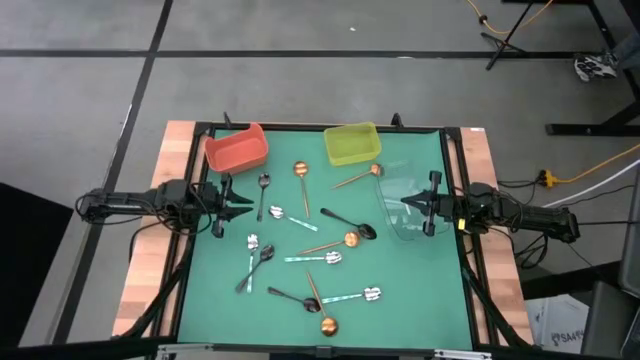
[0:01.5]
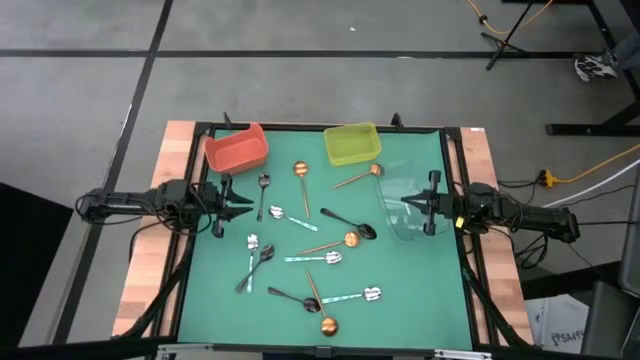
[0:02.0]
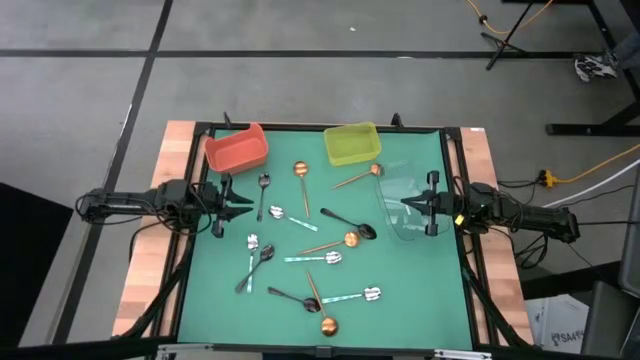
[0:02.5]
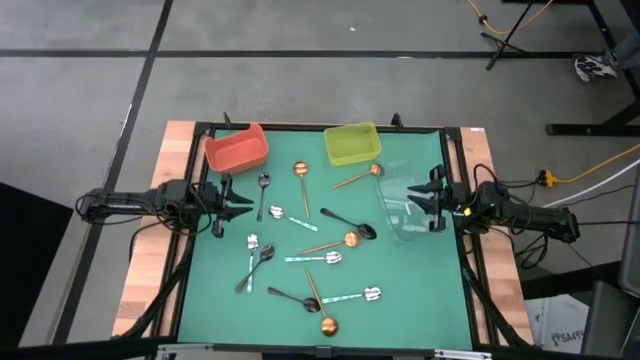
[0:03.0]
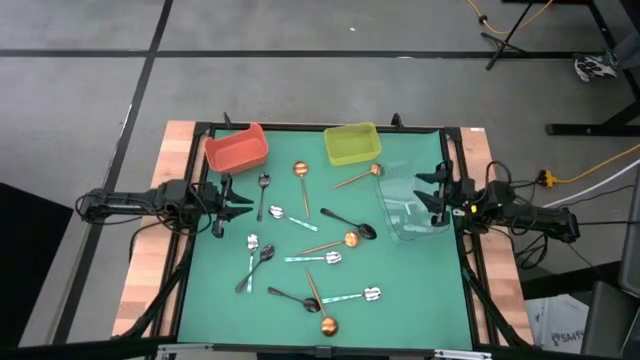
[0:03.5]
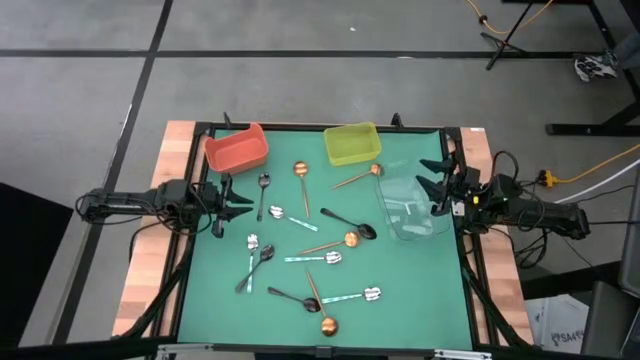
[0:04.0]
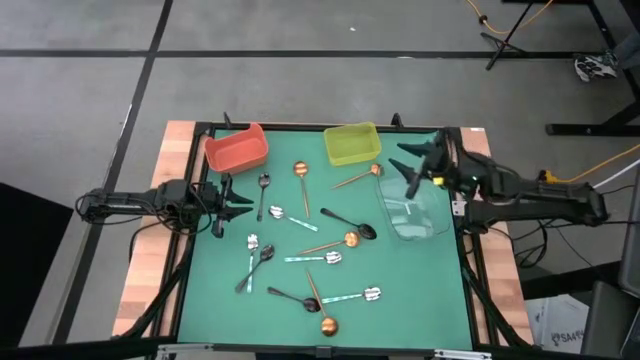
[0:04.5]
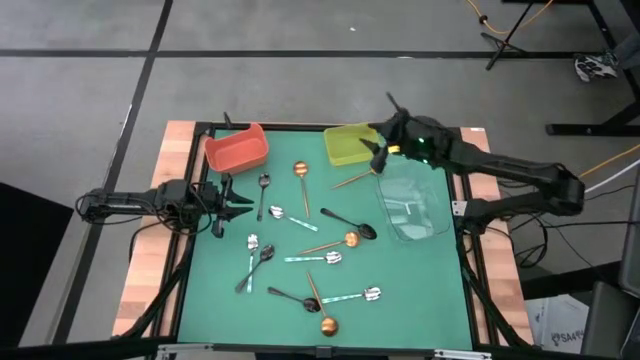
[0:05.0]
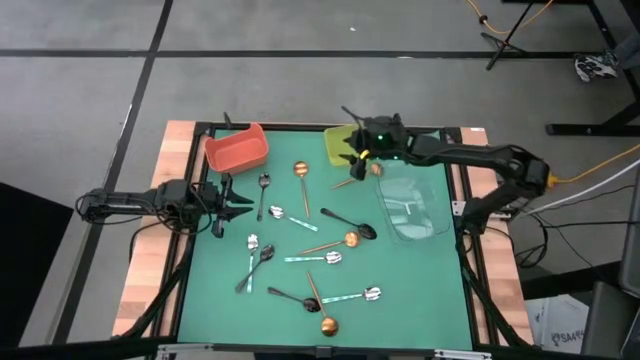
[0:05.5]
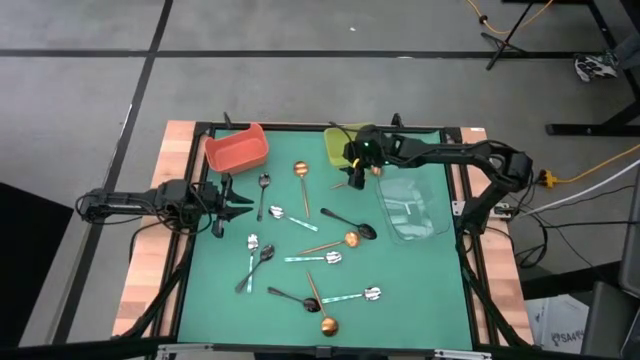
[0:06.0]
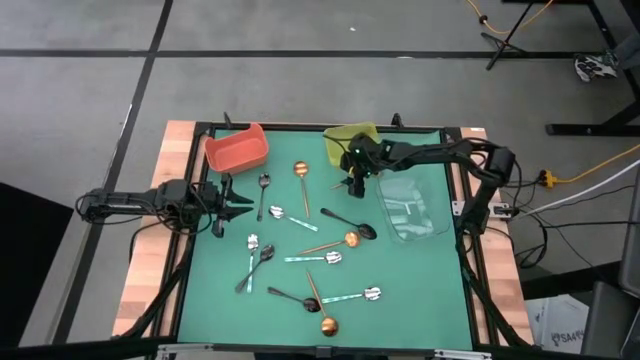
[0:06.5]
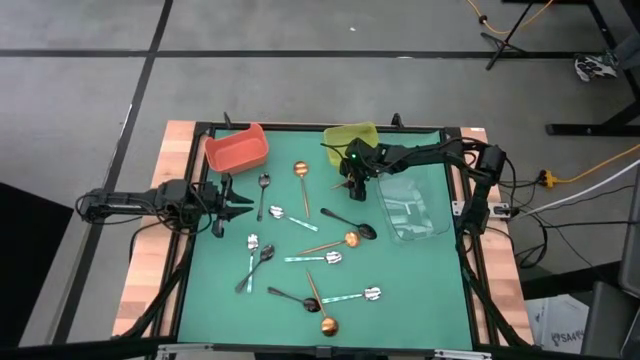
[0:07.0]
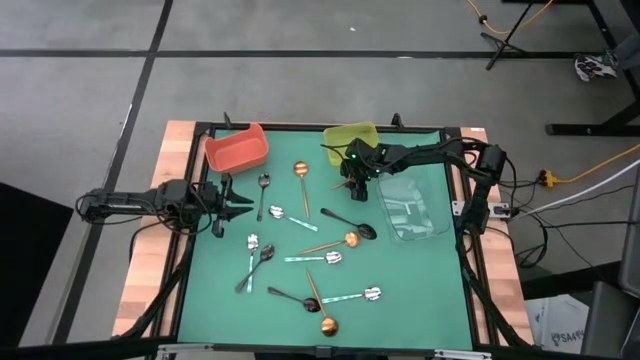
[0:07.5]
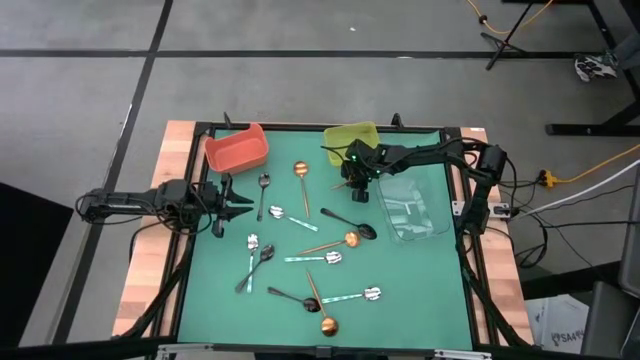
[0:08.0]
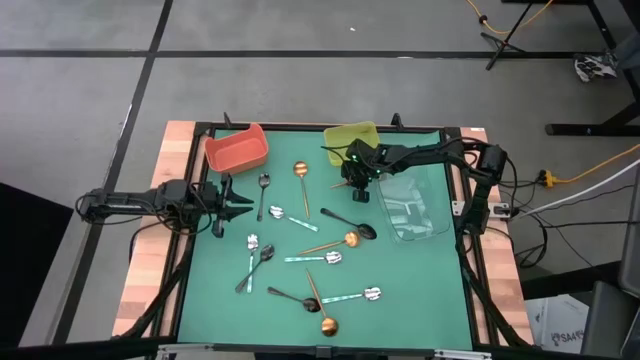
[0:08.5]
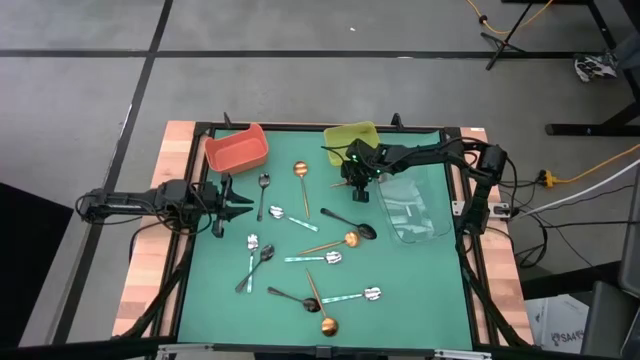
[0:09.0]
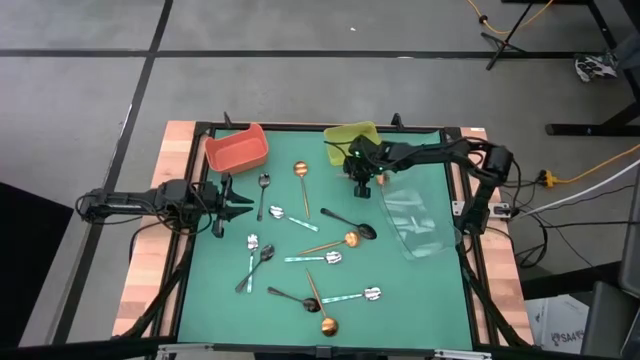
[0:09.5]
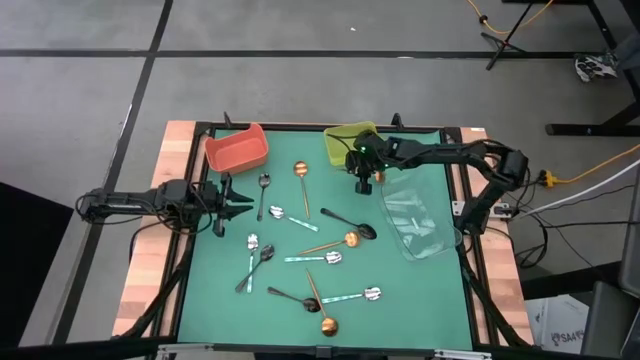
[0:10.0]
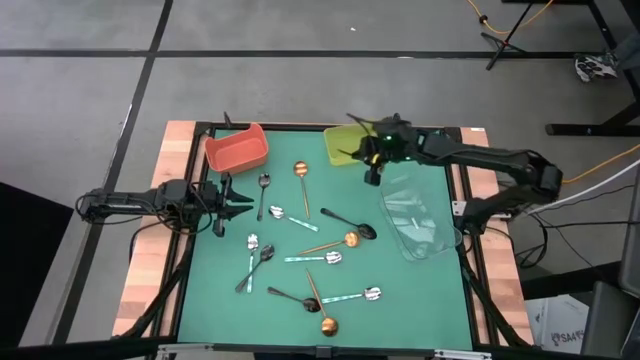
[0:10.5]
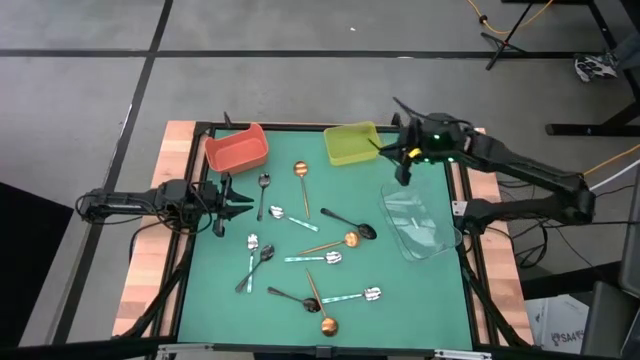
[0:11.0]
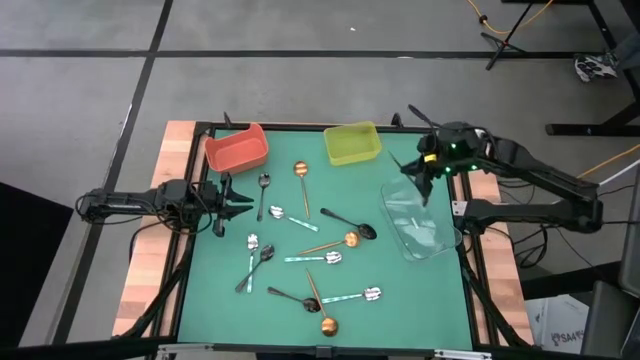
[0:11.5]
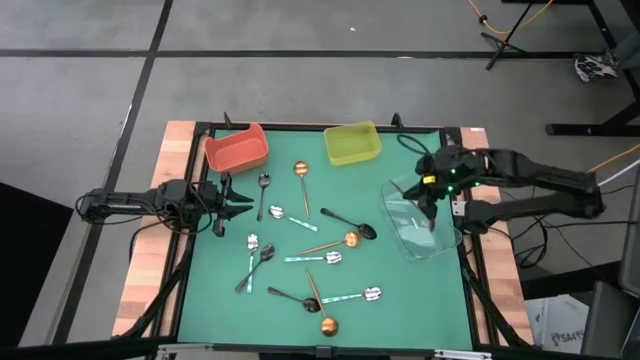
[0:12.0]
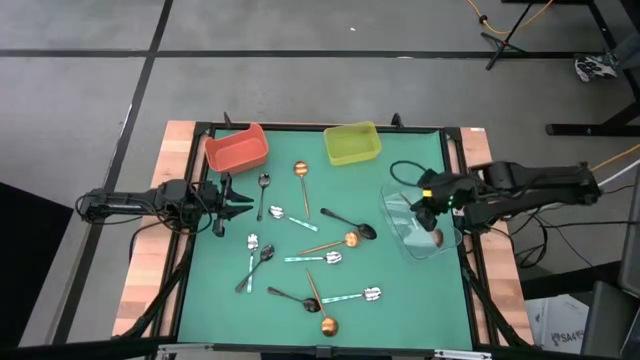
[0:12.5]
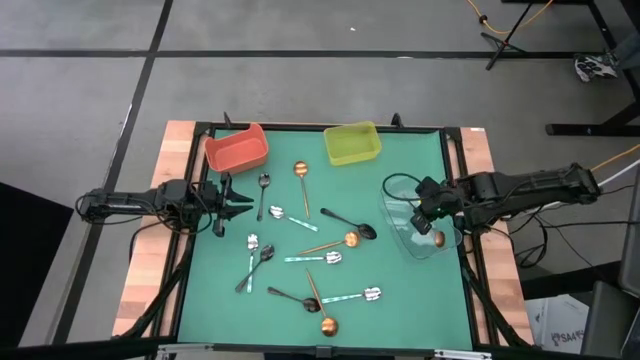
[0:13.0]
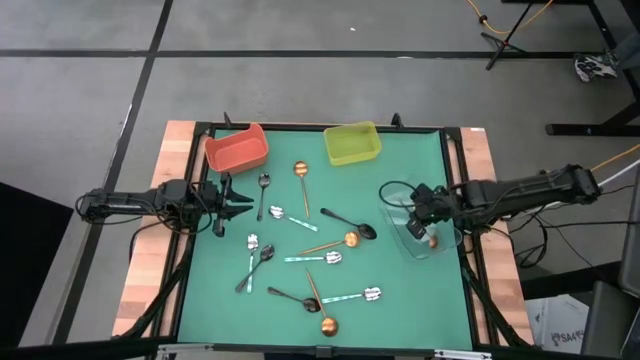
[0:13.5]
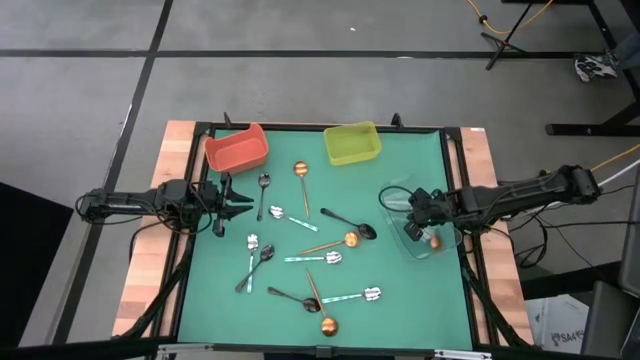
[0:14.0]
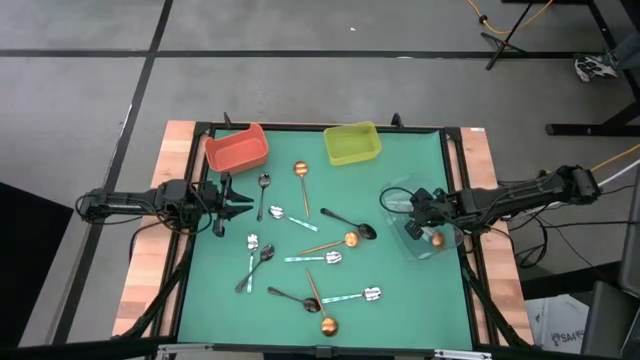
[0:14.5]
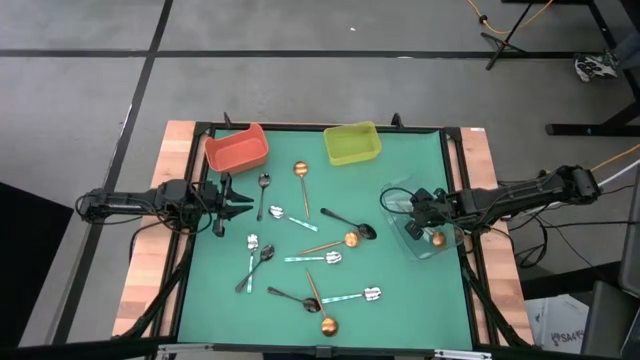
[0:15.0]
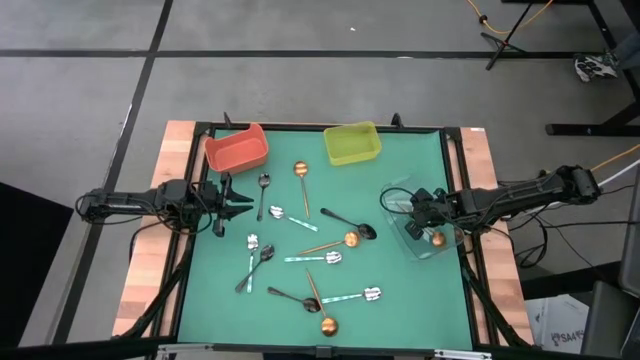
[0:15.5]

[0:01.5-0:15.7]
Task: Sort silverware by color (type)
Put the top right gold spoon into the transparent bin

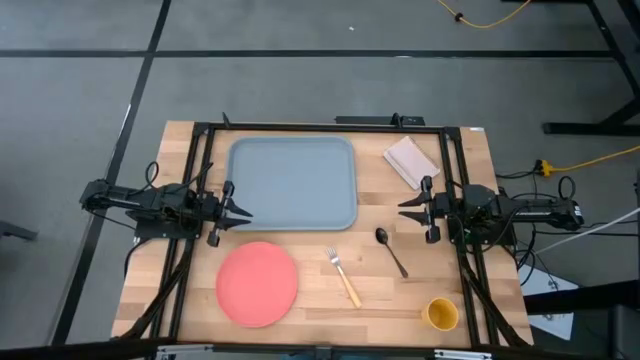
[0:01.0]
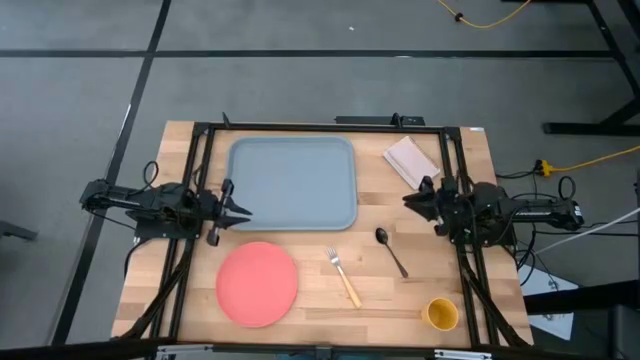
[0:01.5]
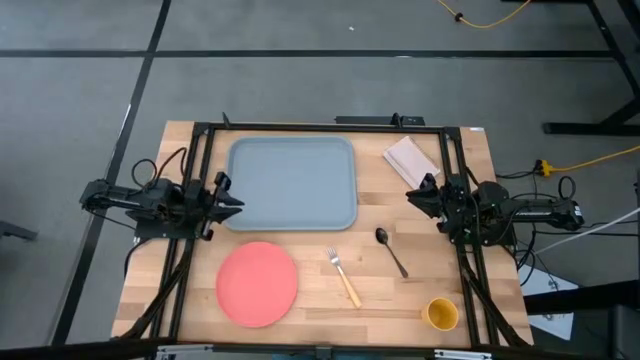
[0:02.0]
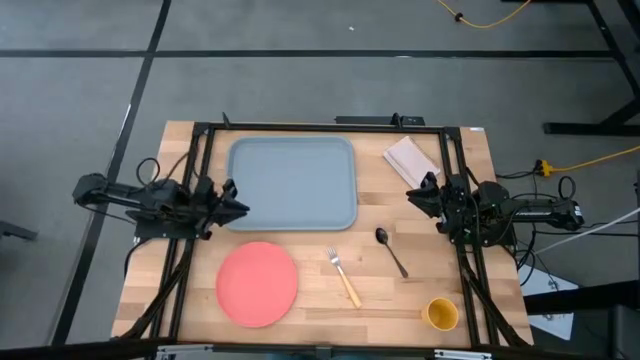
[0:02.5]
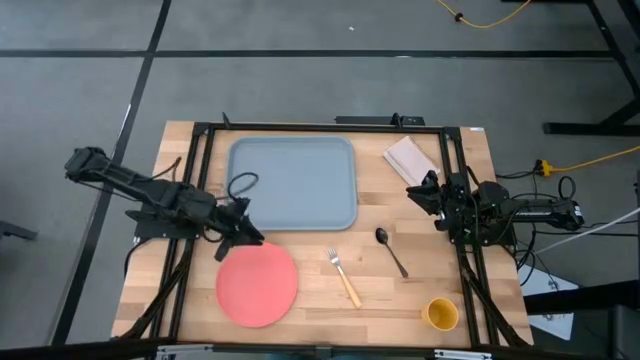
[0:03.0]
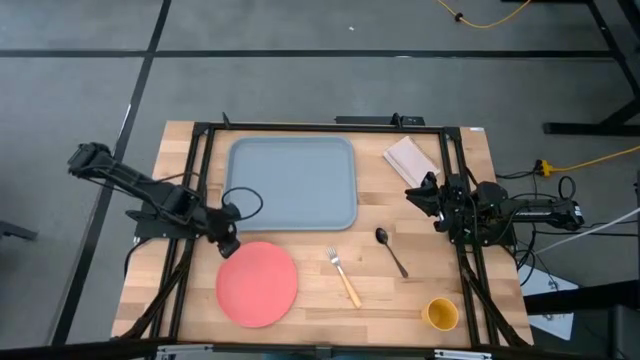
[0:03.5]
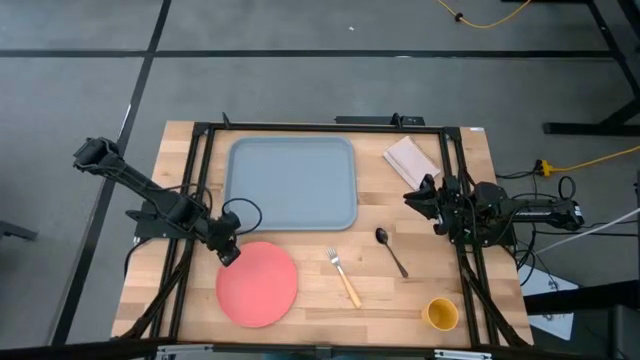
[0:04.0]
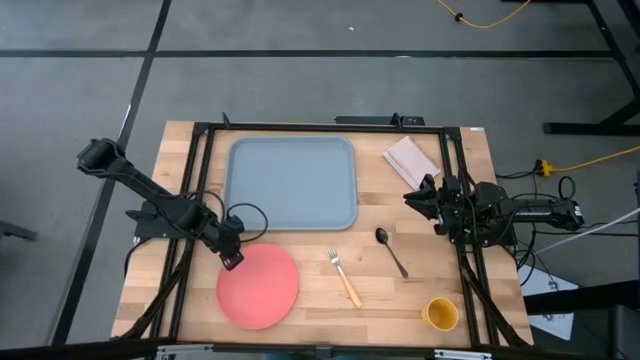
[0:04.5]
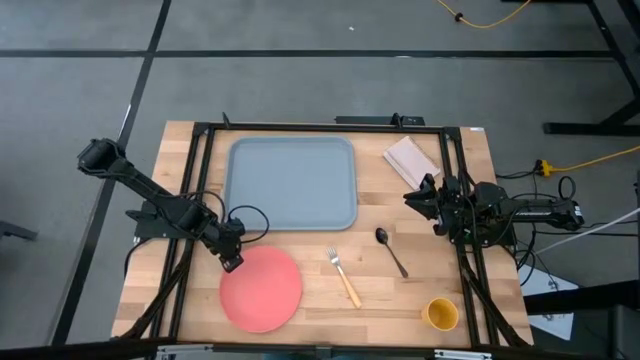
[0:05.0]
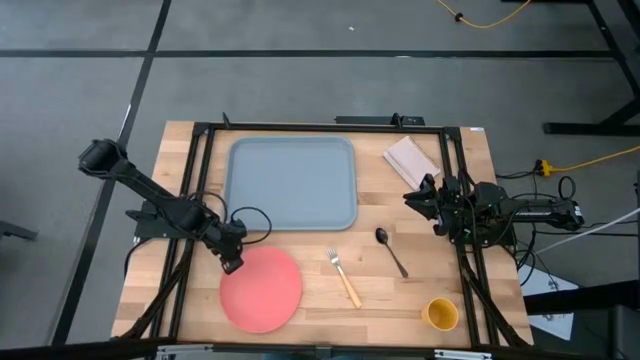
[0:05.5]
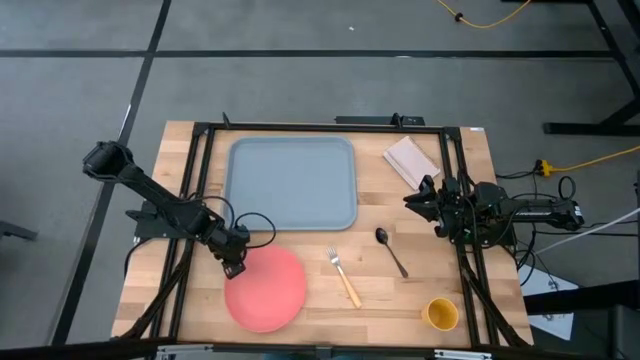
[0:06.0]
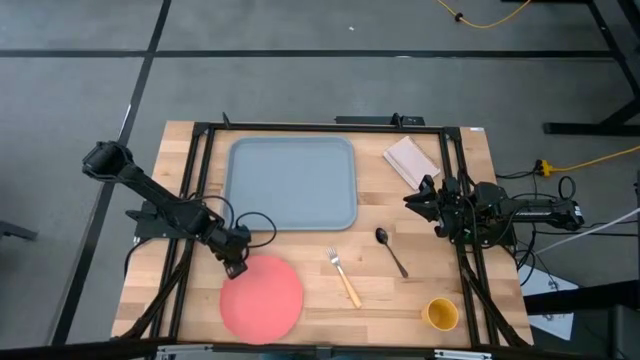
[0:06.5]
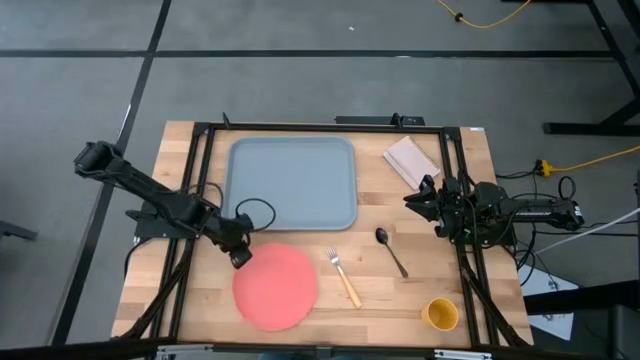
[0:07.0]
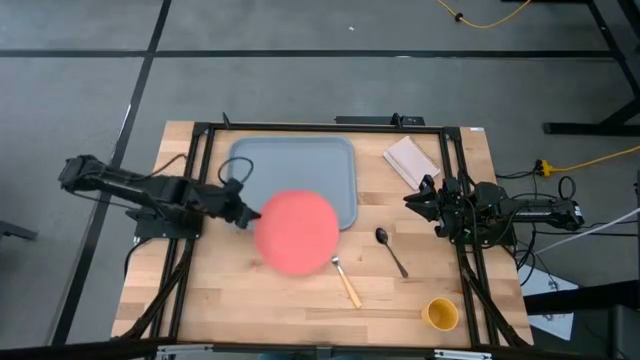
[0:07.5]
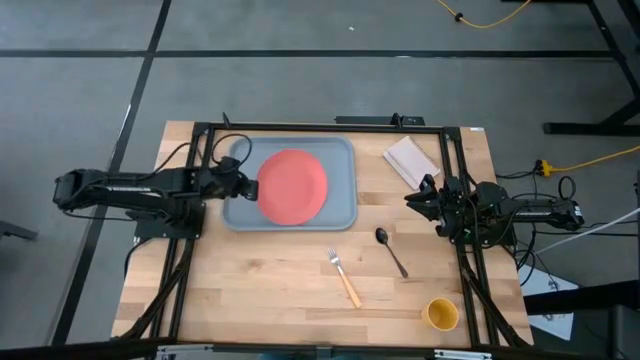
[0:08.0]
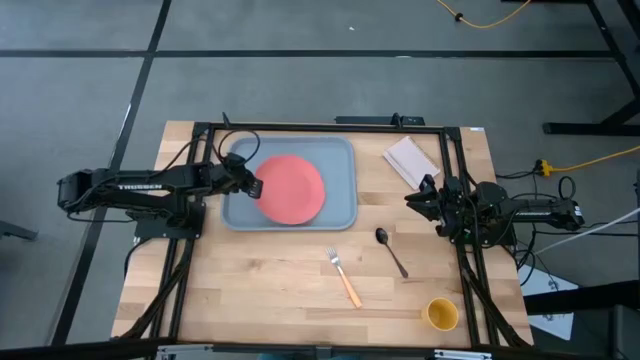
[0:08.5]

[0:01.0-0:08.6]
Task: Pick and place plate/cup/fork/spoon on tray
Put the pink plate on the blue serving tray
